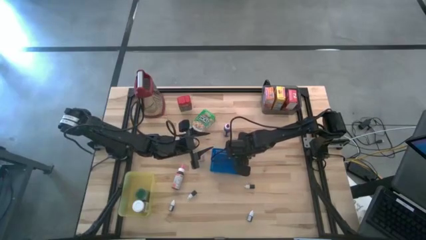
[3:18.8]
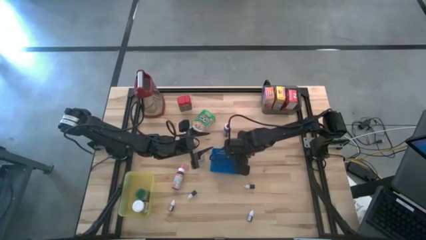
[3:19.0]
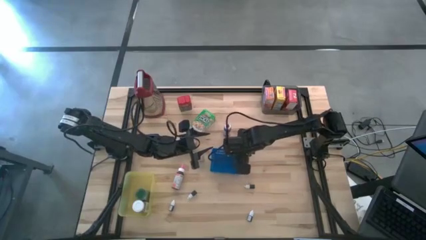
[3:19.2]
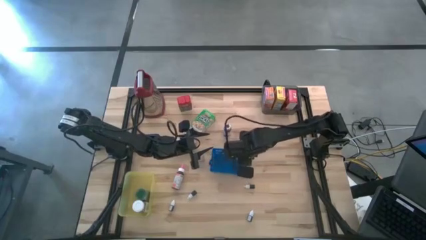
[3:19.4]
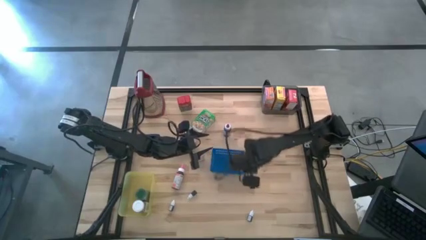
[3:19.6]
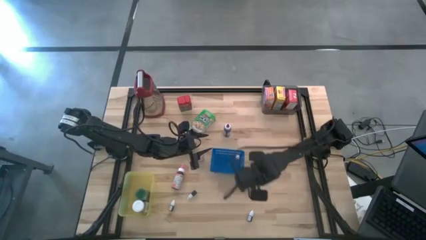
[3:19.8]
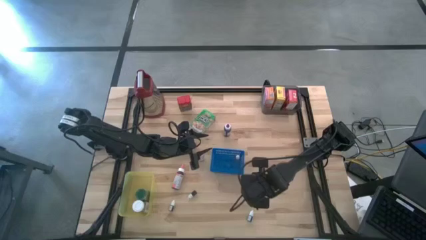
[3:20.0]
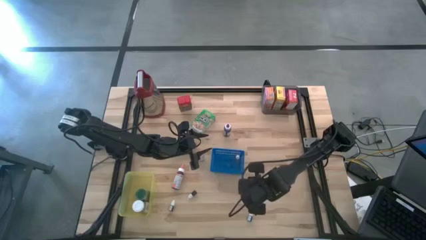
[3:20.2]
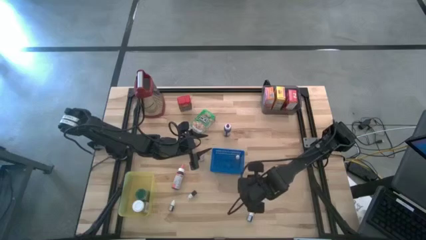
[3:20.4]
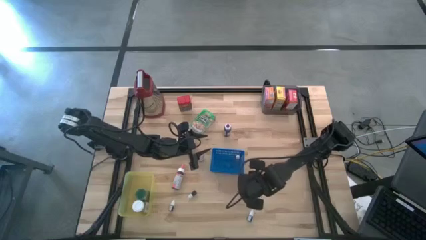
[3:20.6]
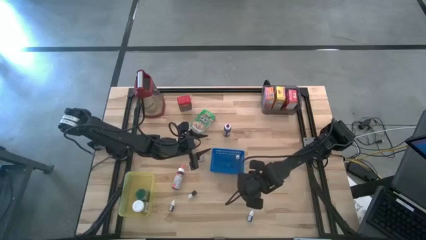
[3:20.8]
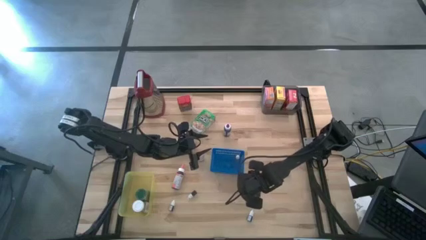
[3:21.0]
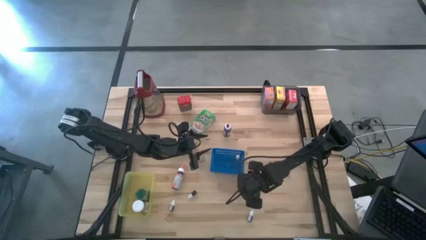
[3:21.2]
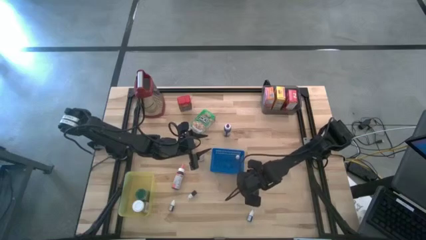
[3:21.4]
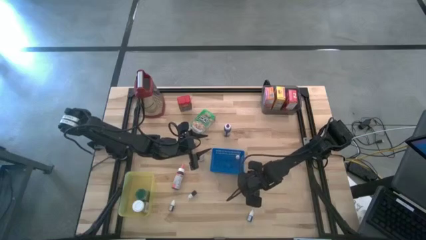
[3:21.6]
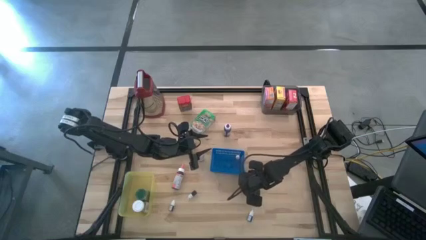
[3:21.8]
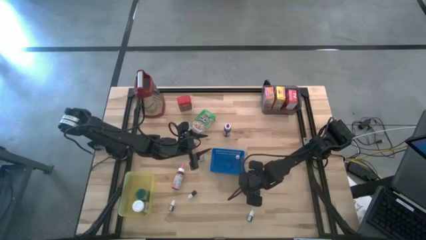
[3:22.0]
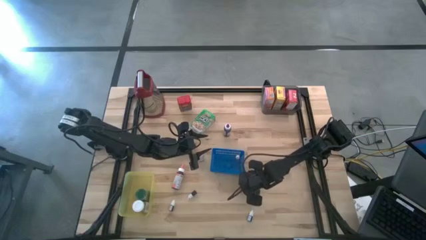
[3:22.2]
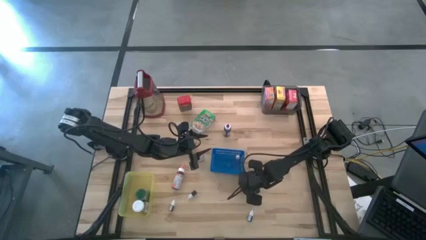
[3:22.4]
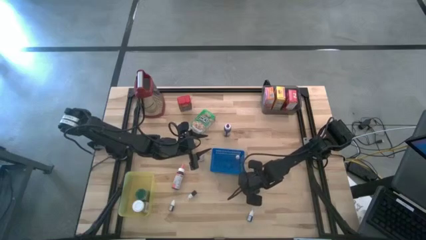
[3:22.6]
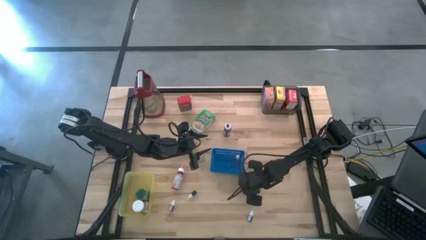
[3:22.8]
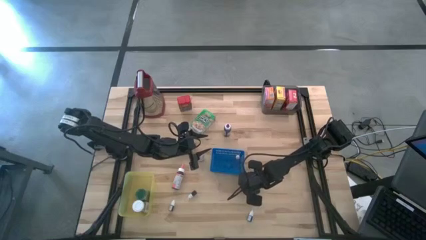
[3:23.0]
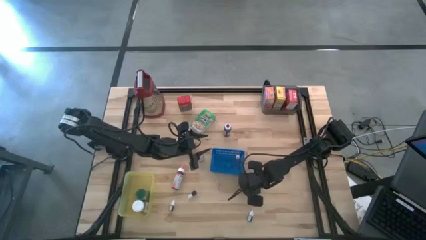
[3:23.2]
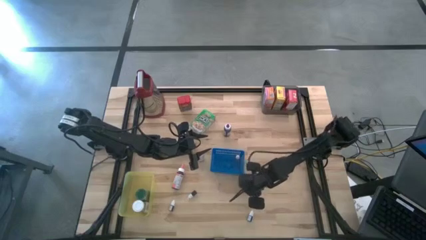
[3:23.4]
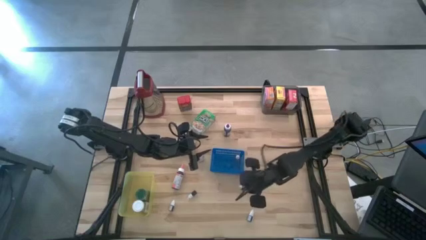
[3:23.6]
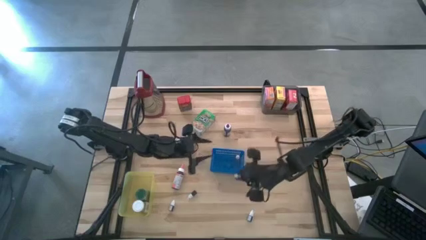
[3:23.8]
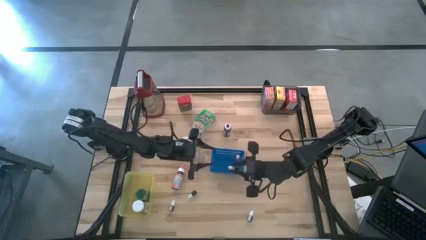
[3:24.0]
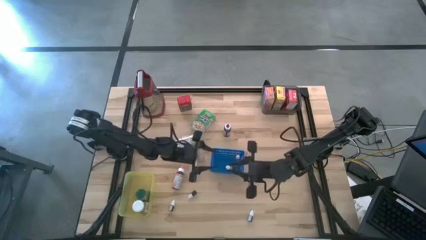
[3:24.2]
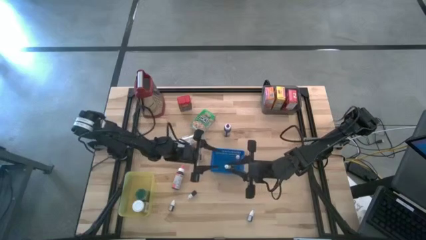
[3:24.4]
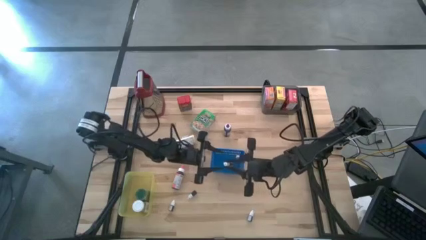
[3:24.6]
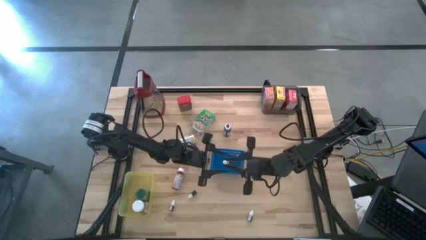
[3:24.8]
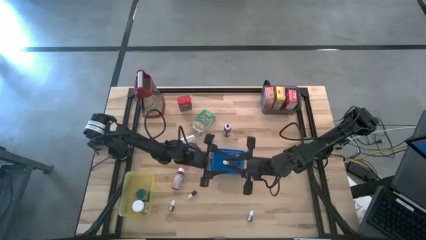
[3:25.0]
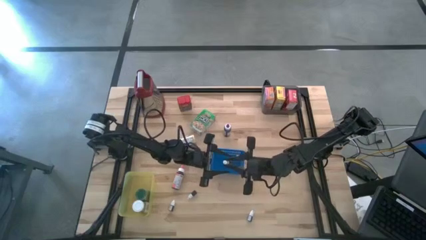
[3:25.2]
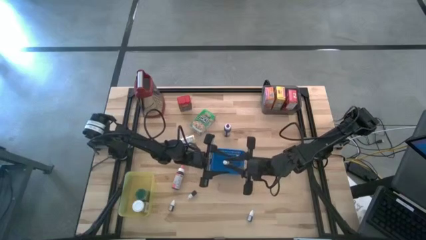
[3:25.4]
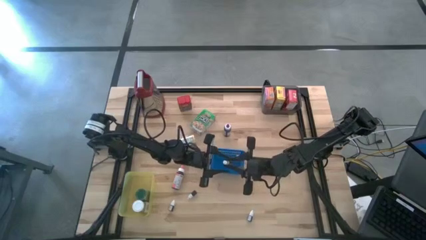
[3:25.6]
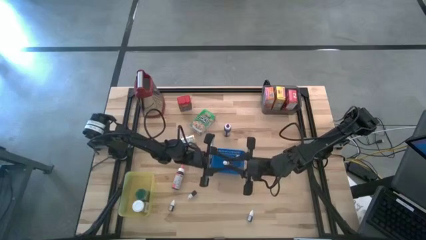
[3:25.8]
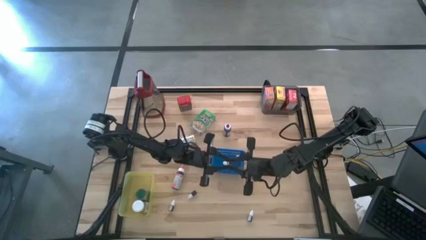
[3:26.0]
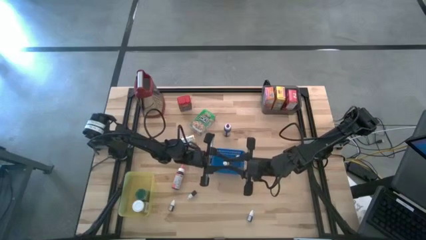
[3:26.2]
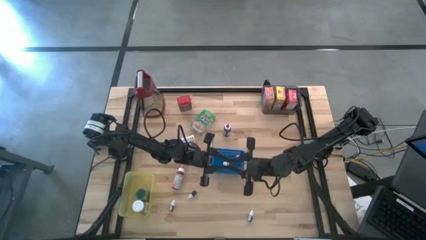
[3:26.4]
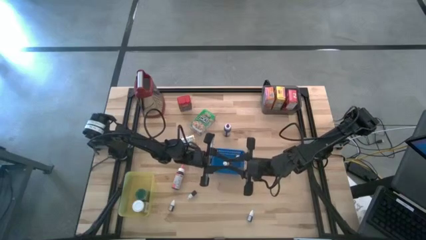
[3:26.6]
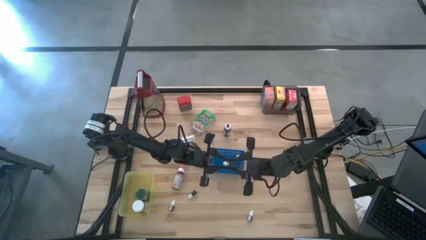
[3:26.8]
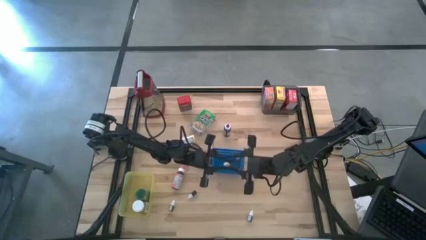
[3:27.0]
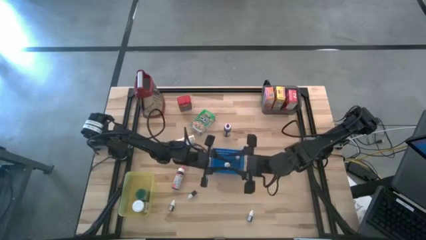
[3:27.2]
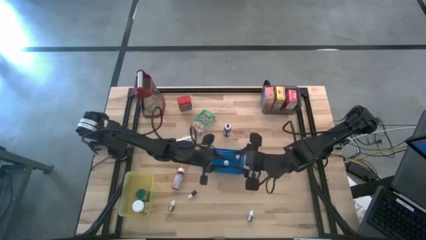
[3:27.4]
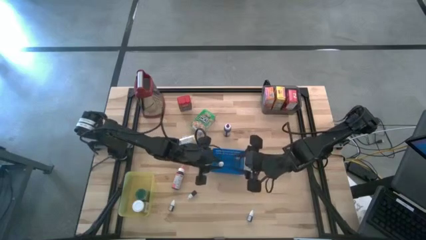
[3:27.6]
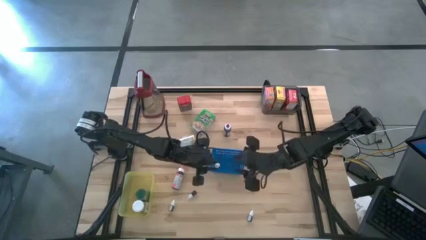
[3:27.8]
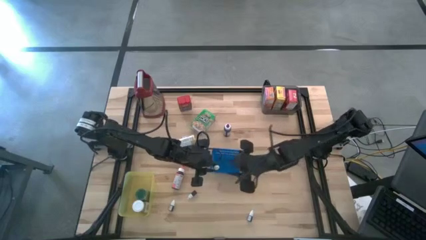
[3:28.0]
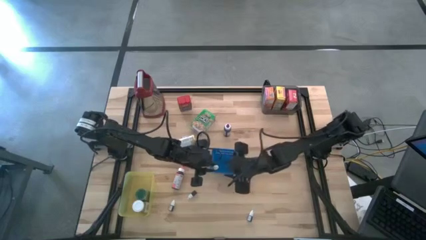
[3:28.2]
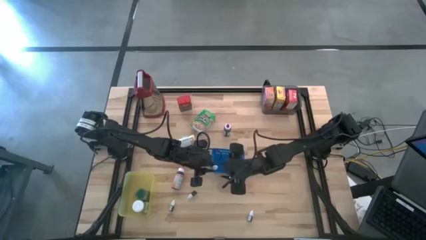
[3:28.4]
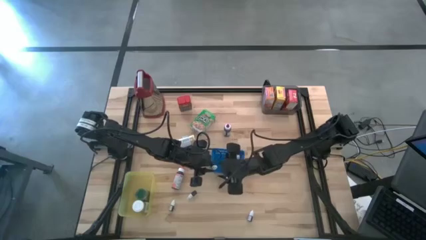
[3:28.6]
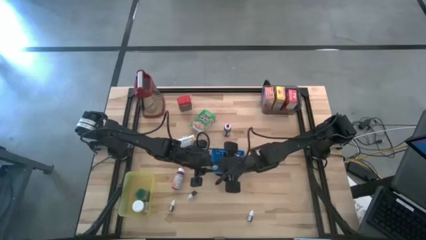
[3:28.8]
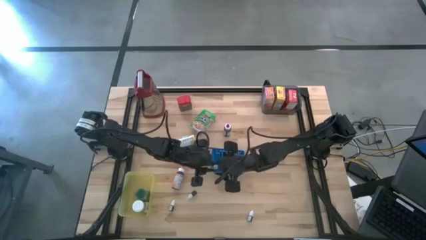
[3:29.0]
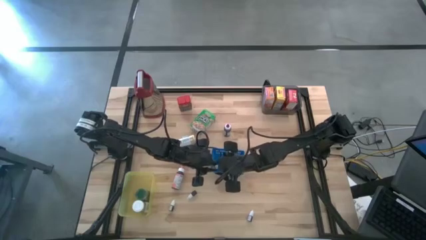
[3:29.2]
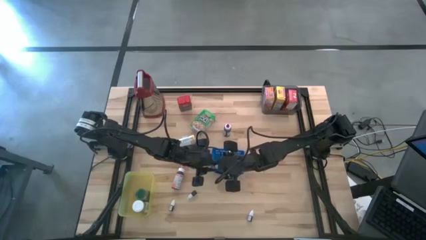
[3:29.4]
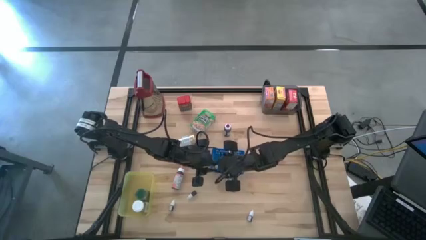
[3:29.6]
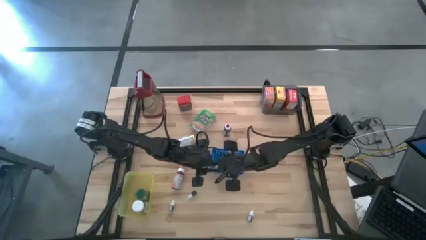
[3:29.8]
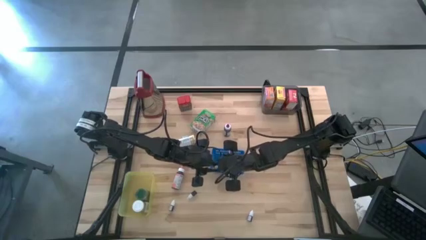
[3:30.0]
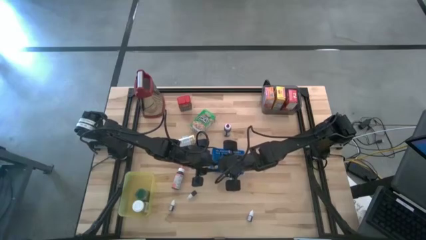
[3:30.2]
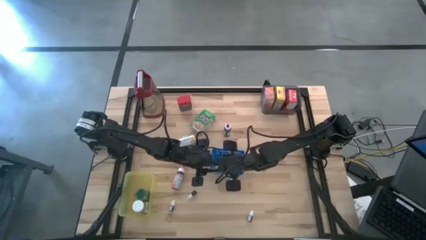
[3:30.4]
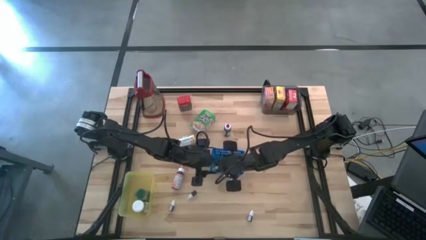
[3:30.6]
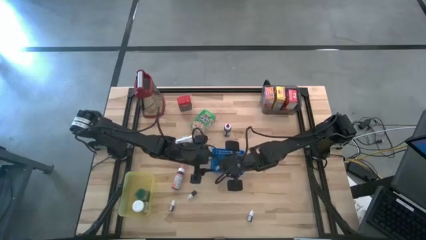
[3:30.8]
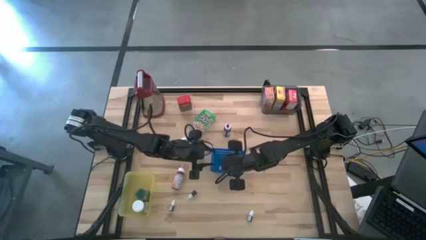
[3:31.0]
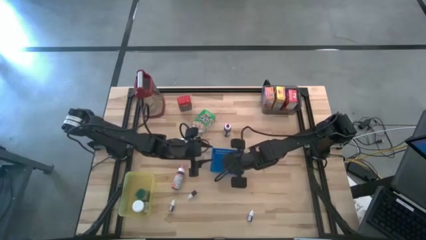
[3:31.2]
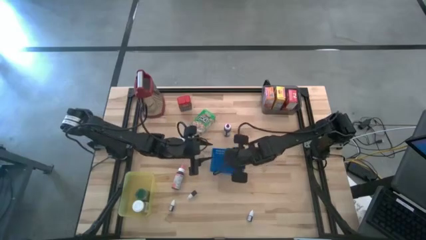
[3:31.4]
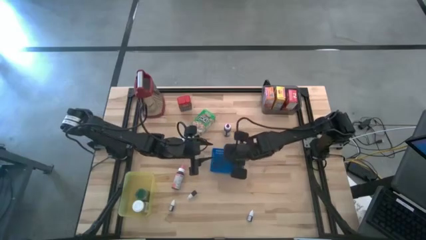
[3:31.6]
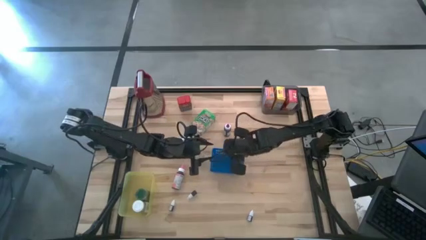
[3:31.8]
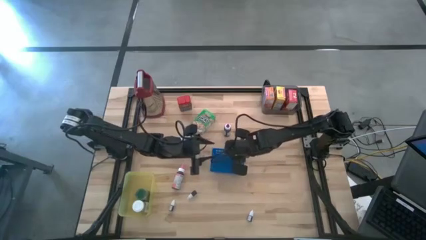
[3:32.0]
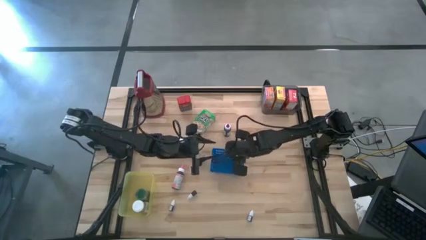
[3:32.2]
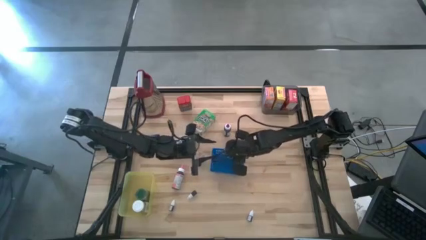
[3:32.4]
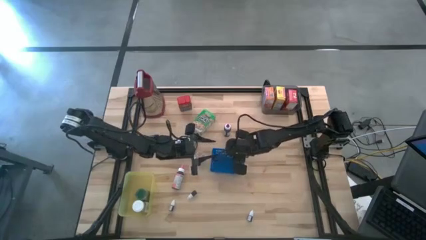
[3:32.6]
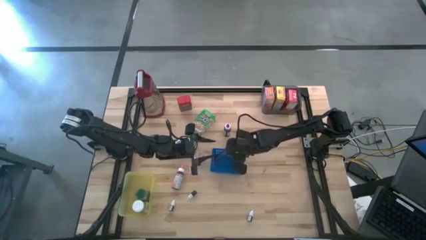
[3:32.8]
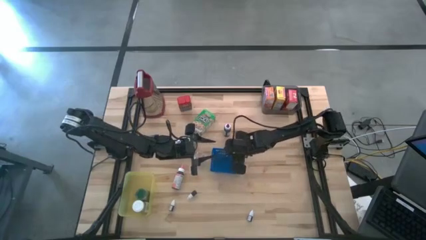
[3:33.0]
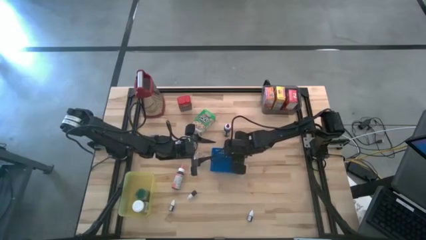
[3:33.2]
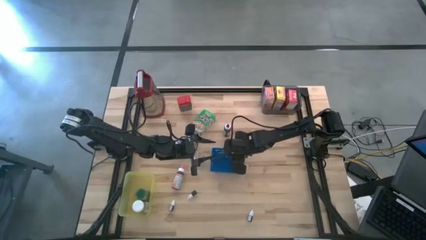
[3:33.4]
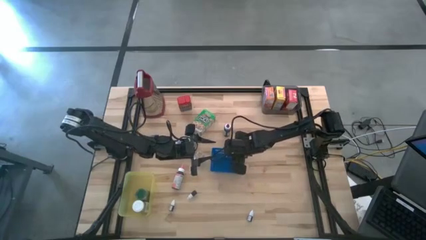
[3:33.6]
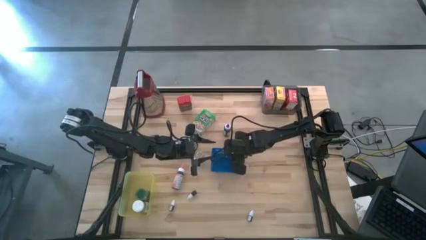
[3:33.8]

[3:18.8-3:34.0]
Task: Pick & Place Kitchen Items
Put the small green food coloring into the blue bin
